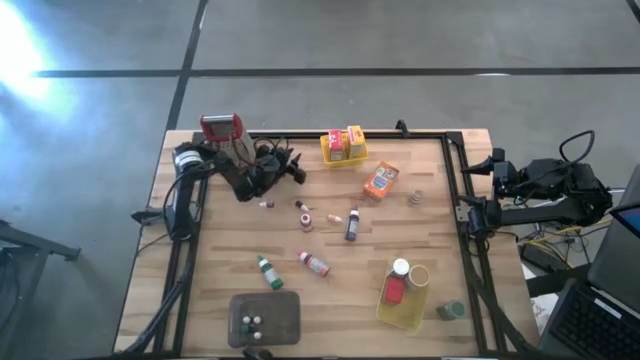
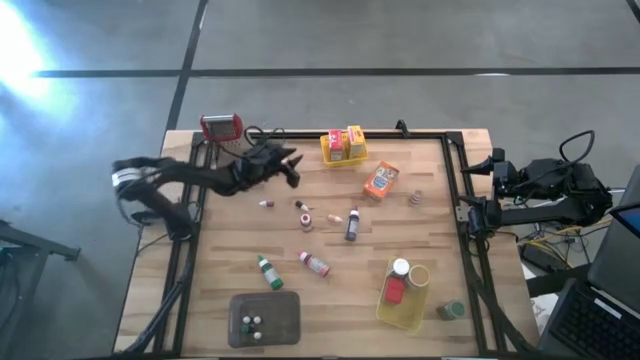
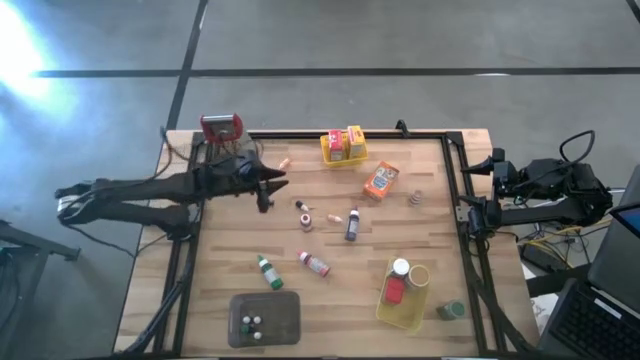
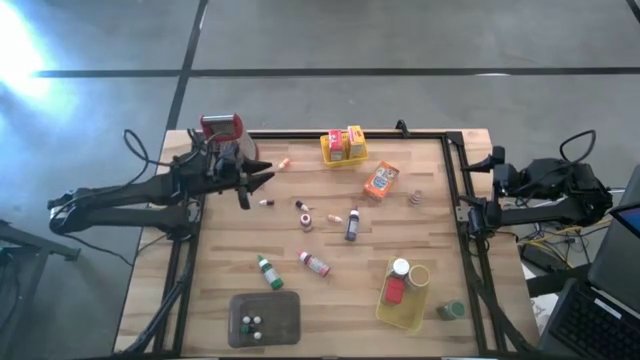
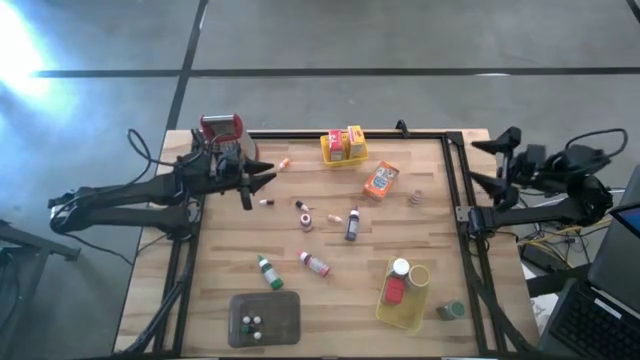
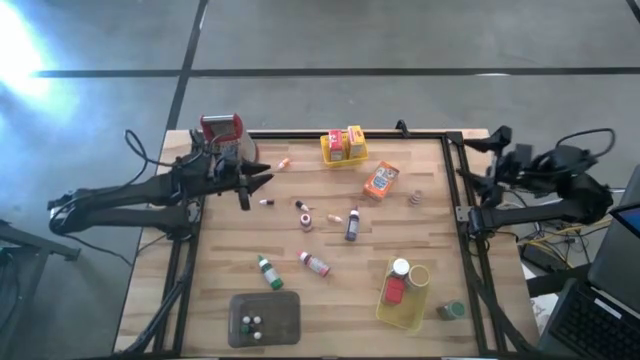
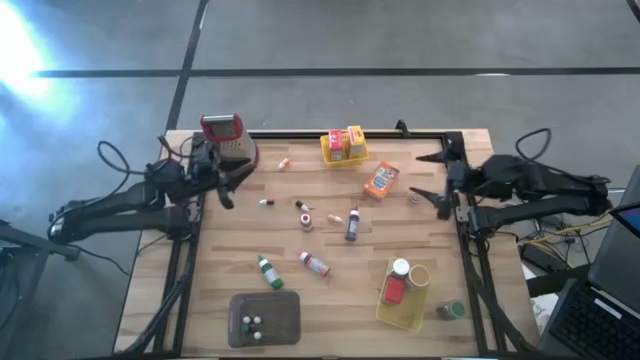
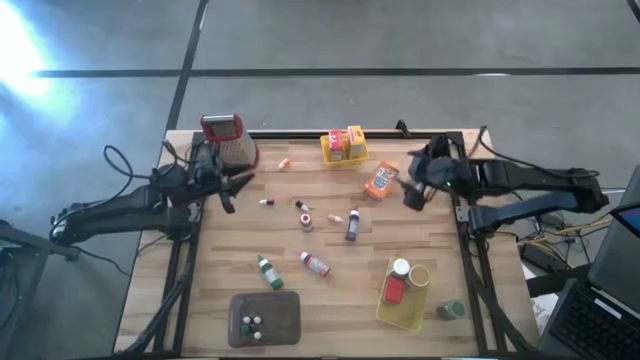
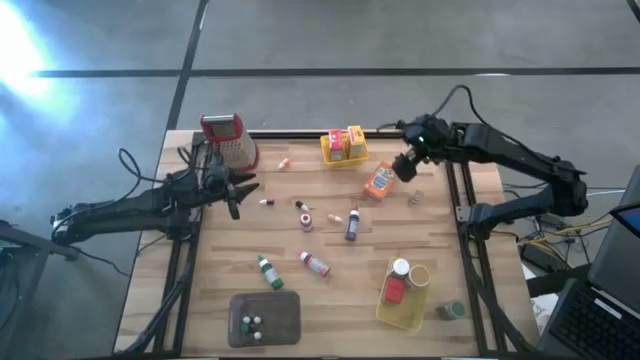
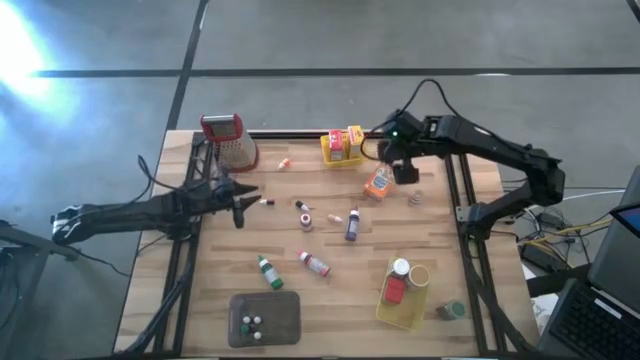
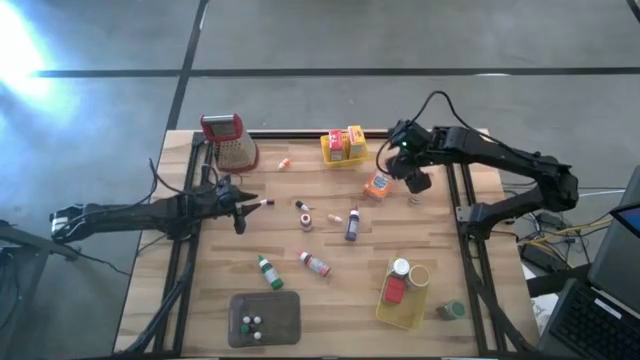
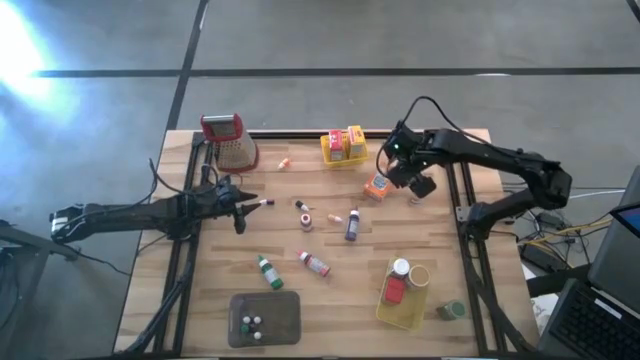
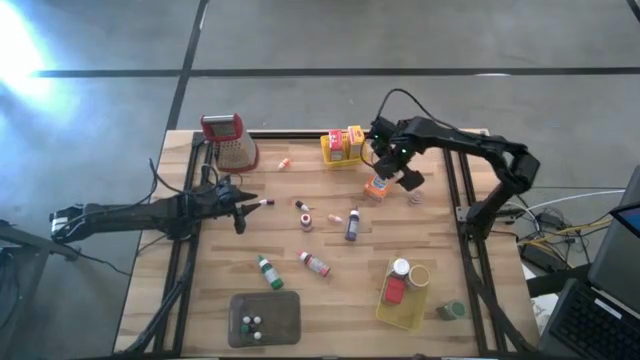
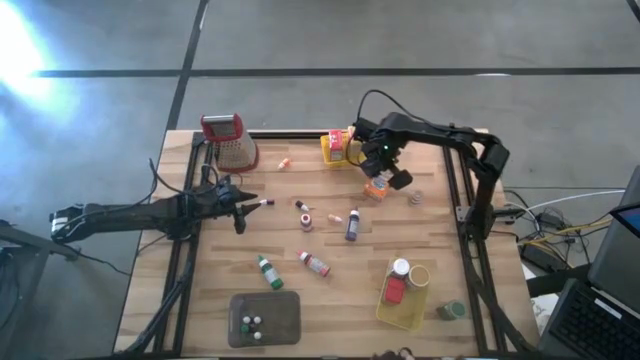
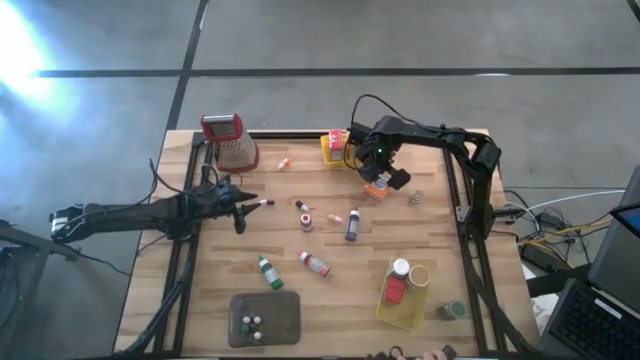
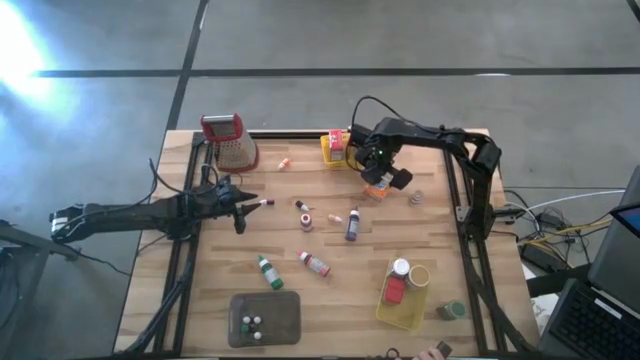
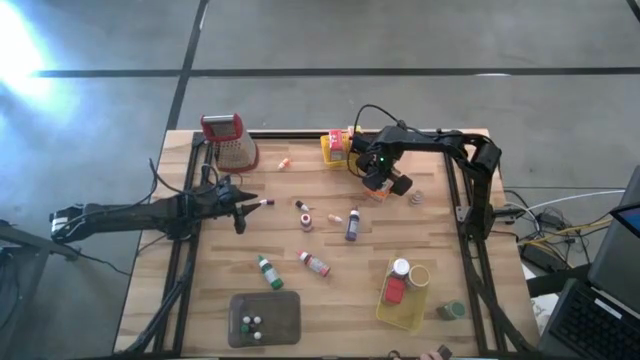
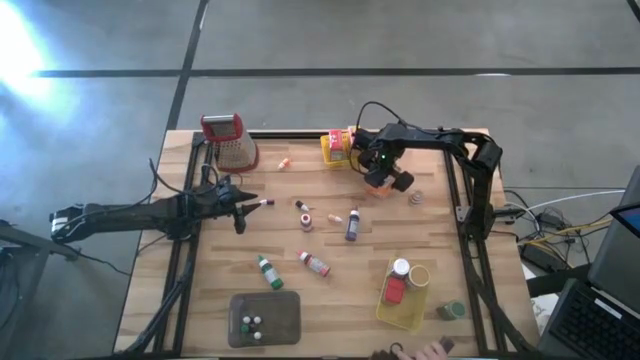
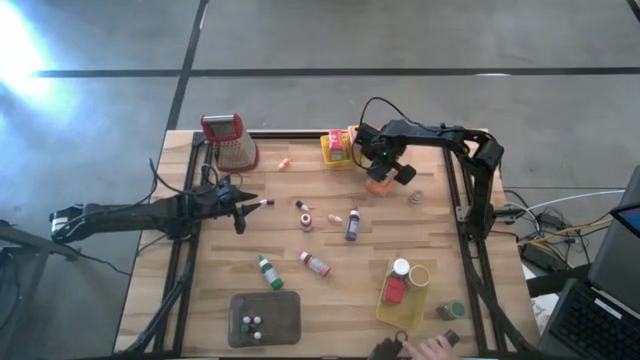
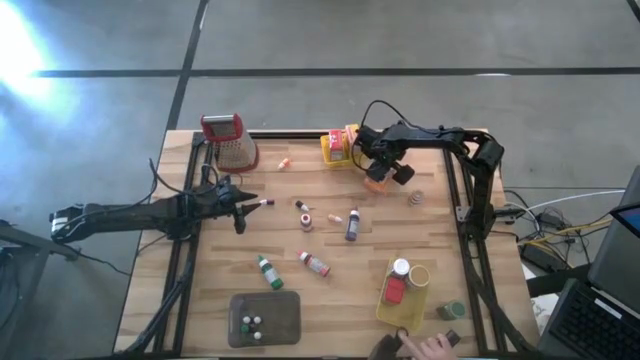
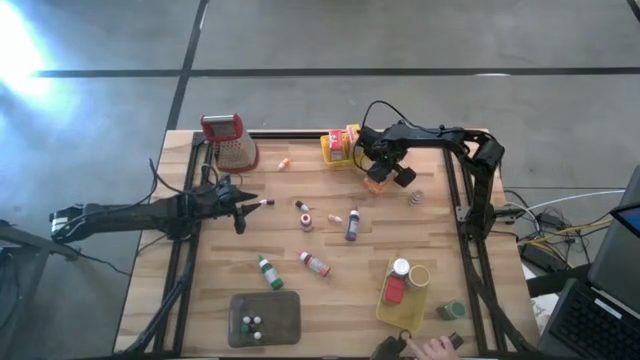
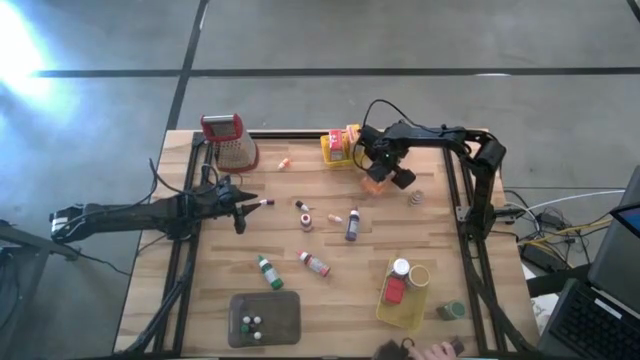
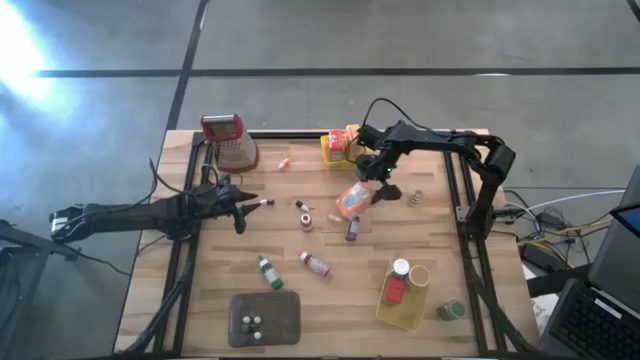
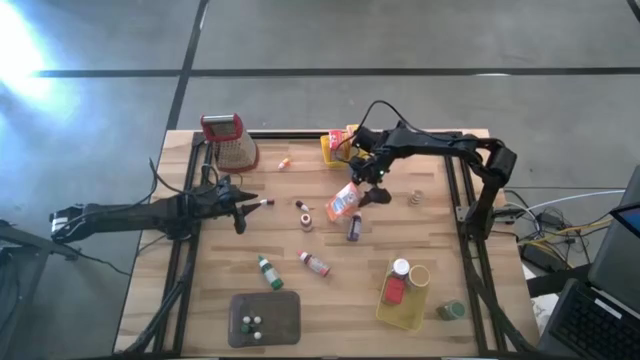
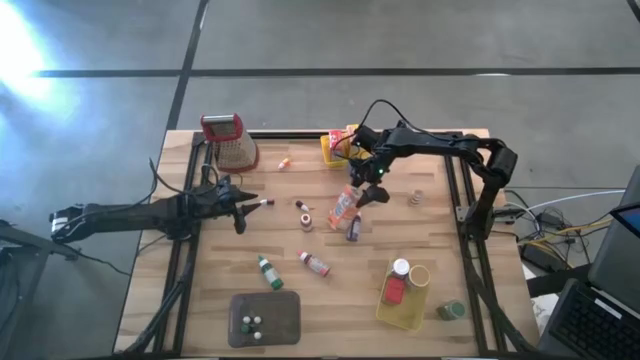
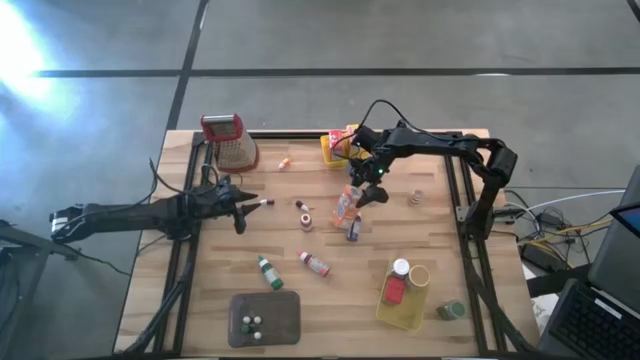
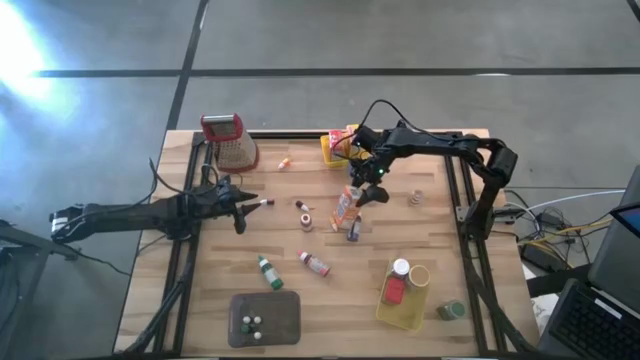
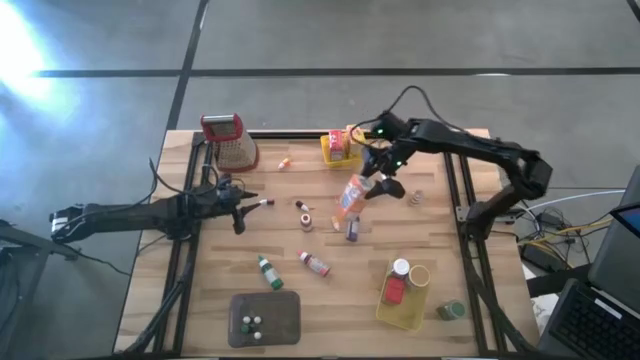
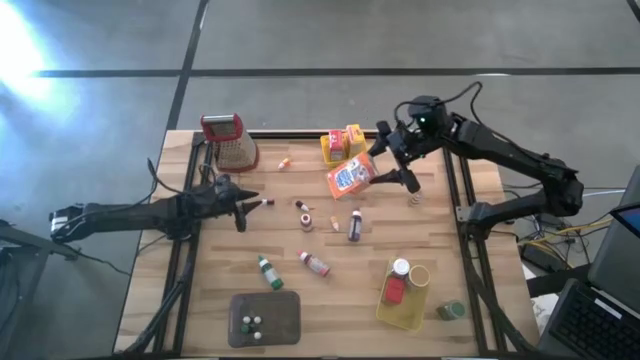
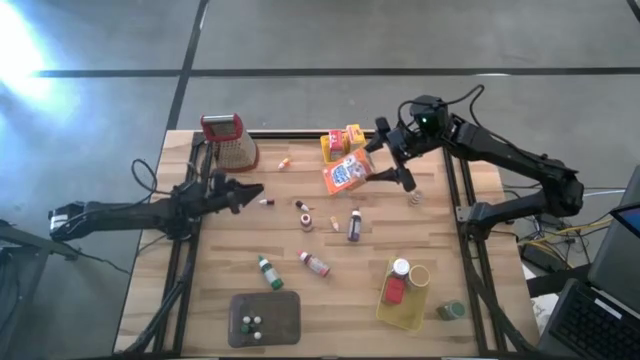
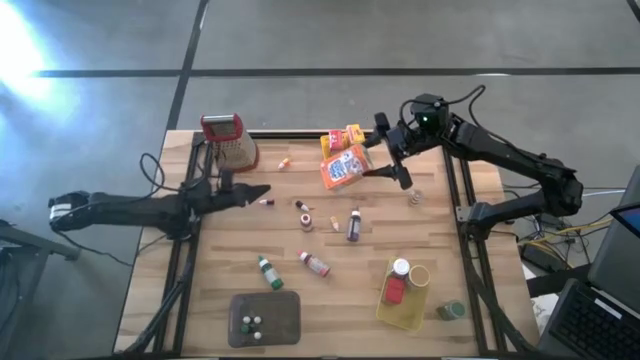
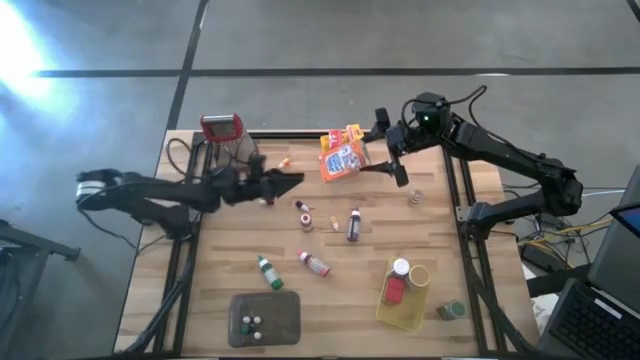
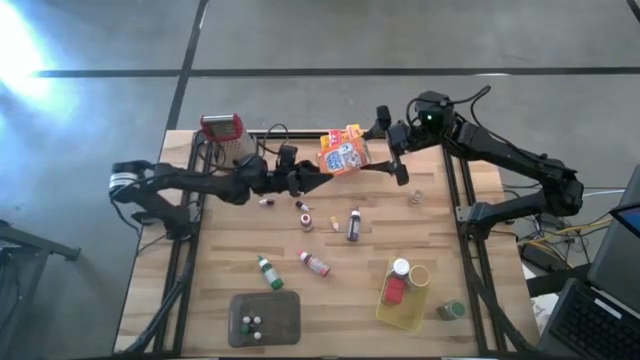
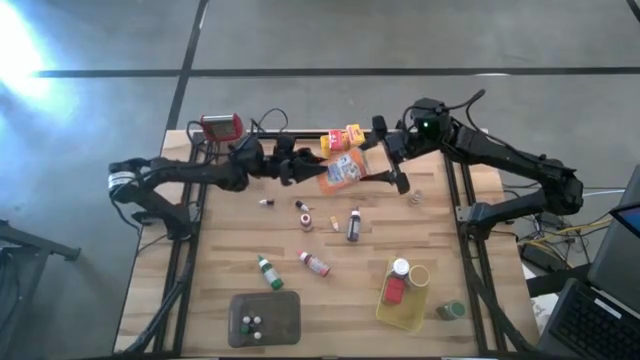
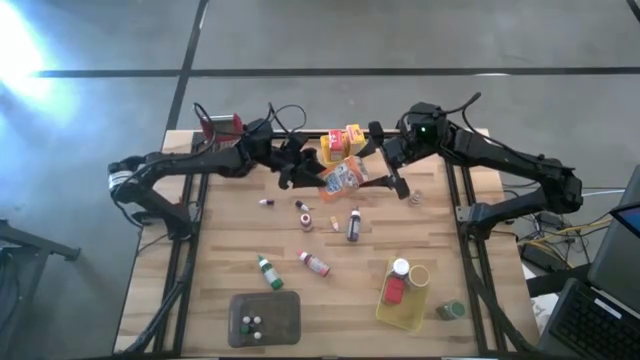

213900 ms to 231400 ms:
Task: Pick & Place Kitchen Items
Put the orange cereal box into the top yellow bin

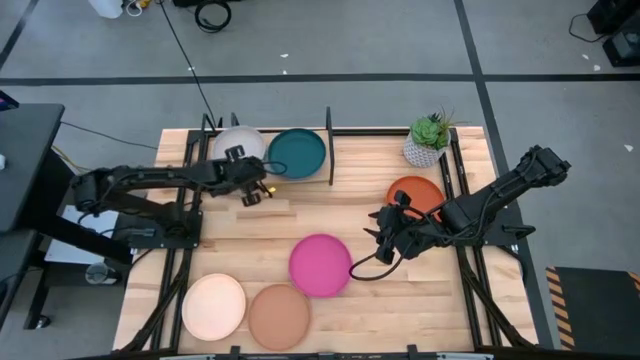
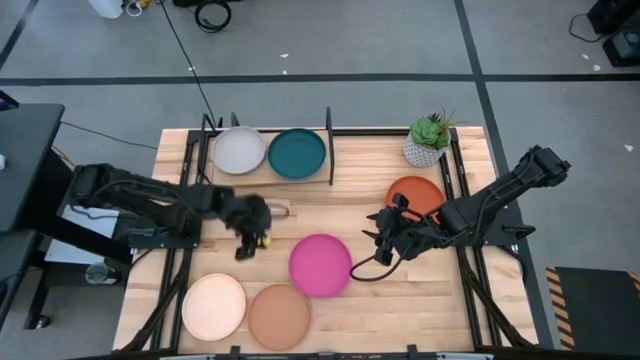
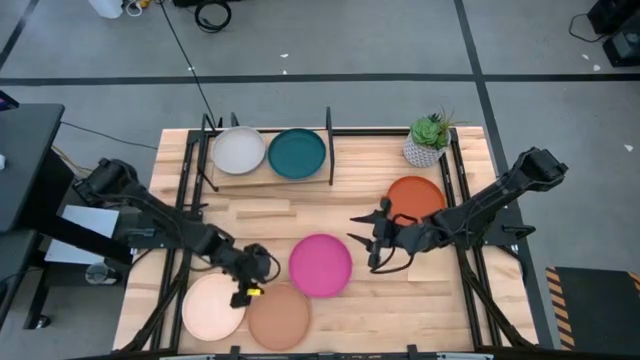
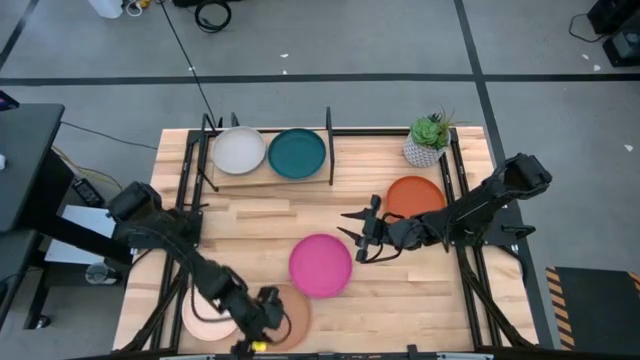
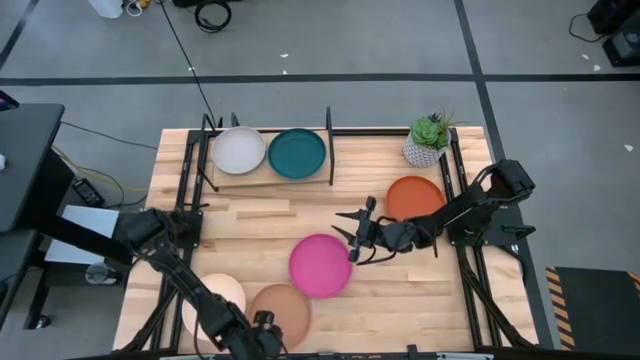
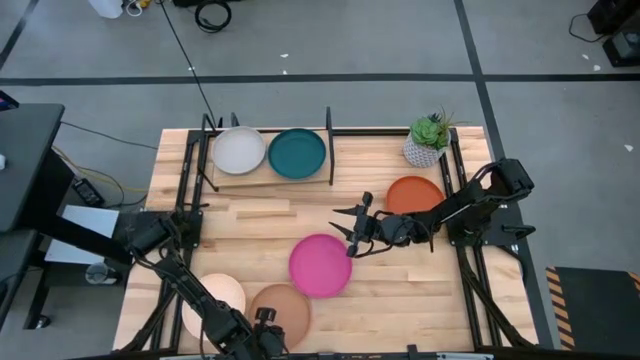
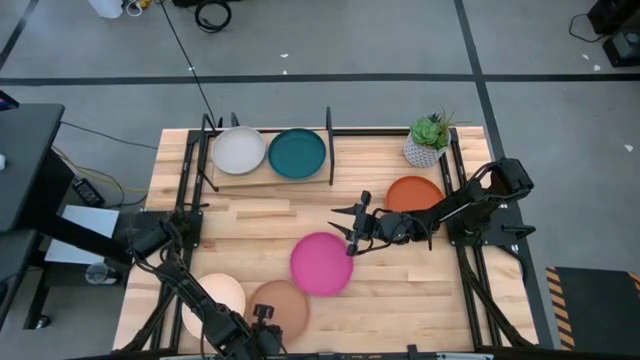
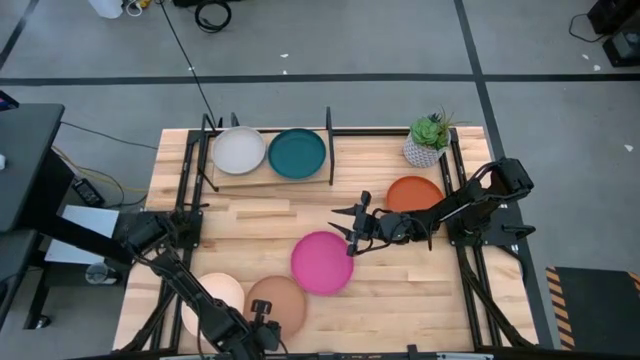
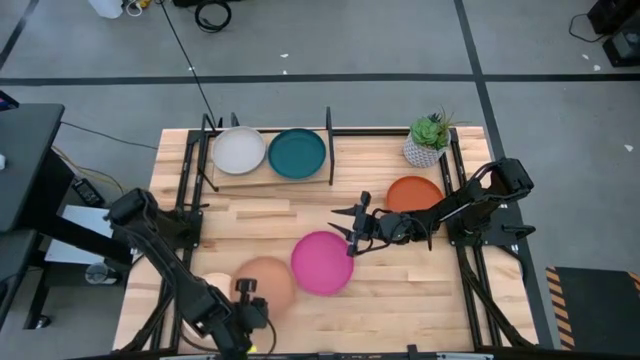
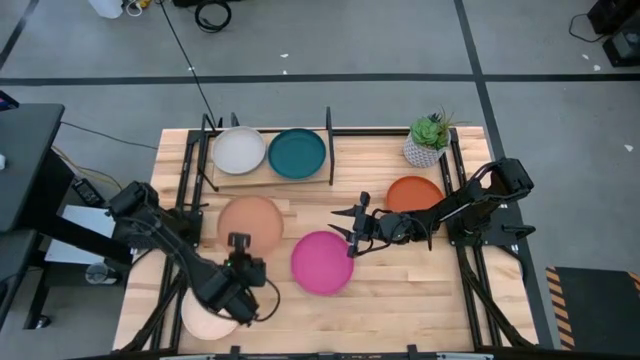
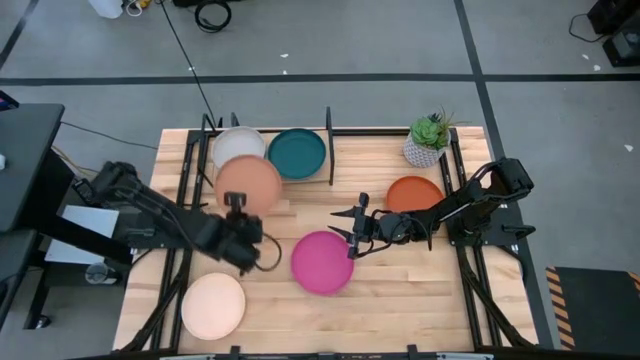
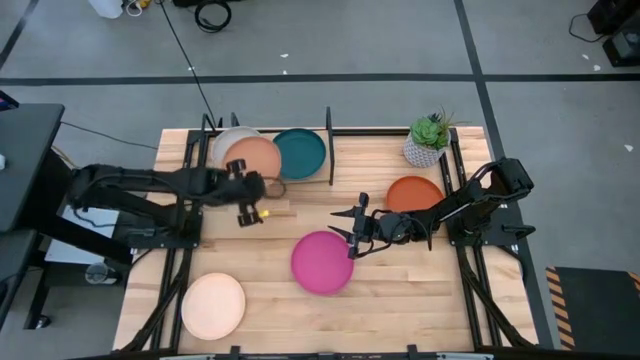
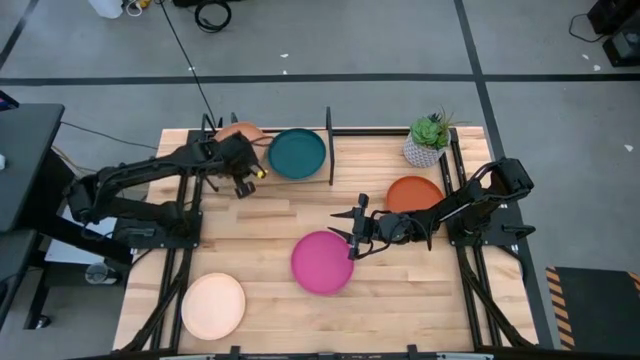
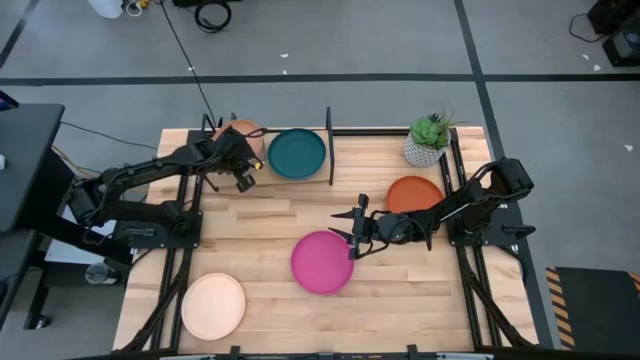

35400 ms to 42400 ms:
Task: Place and stack plates onto a shelf
Stack the brown plate on top of the gray plate on the shelf
